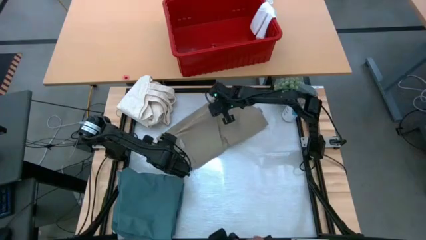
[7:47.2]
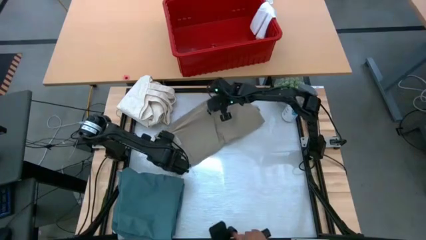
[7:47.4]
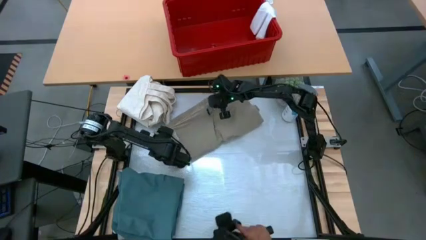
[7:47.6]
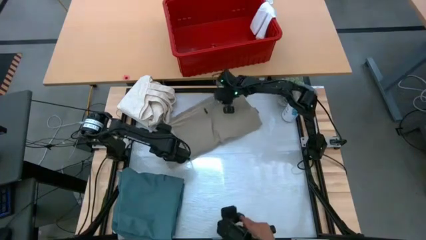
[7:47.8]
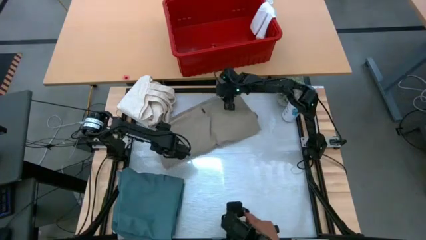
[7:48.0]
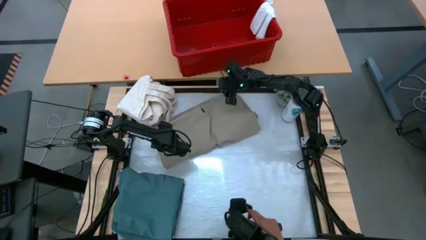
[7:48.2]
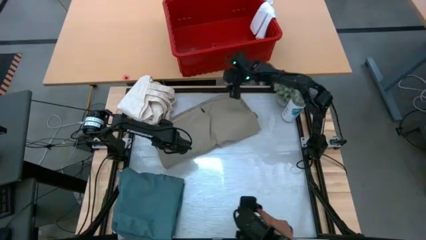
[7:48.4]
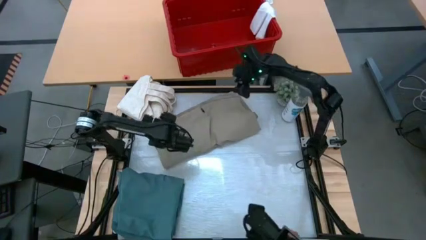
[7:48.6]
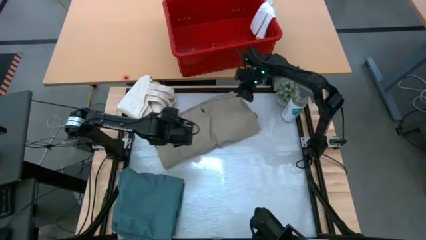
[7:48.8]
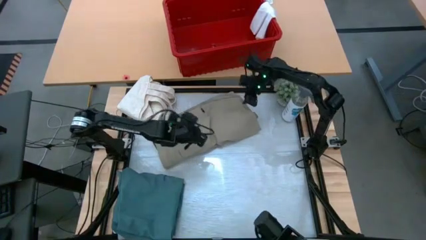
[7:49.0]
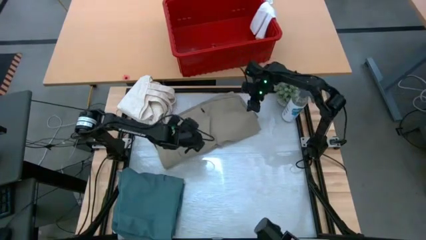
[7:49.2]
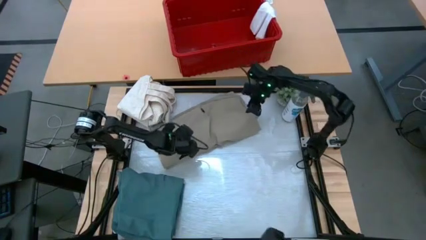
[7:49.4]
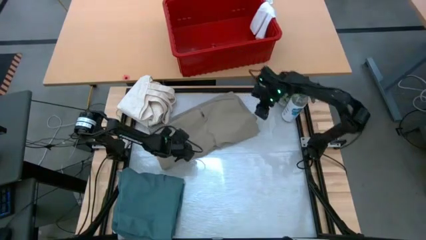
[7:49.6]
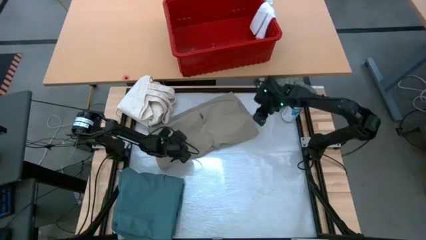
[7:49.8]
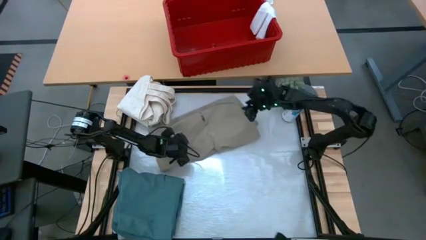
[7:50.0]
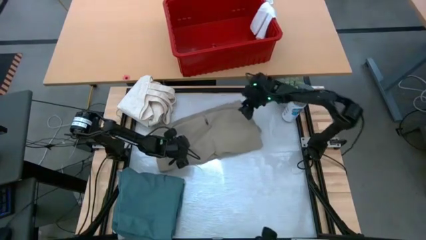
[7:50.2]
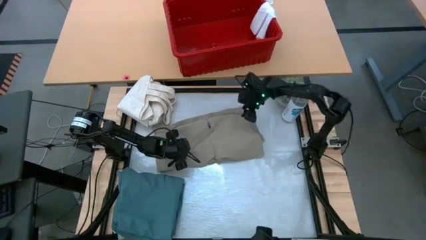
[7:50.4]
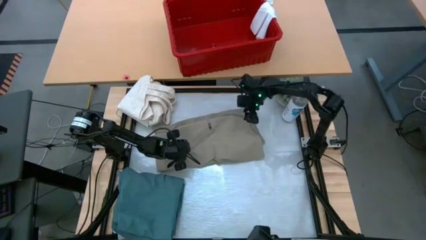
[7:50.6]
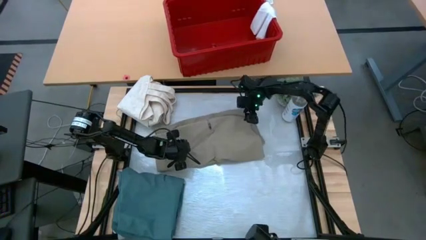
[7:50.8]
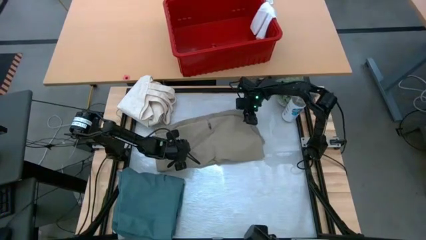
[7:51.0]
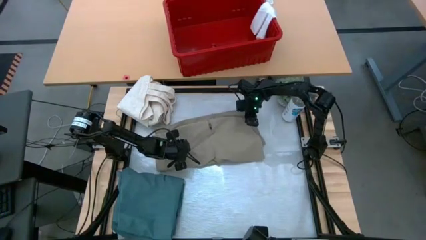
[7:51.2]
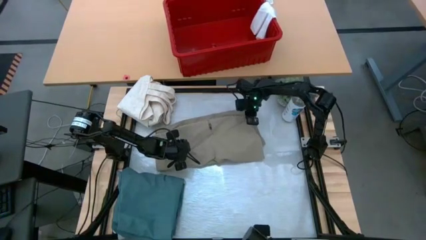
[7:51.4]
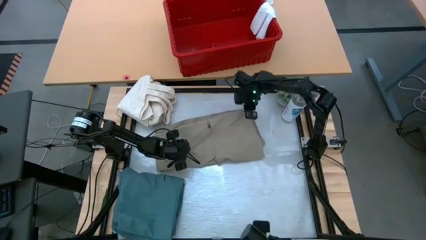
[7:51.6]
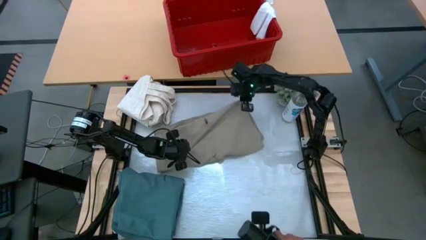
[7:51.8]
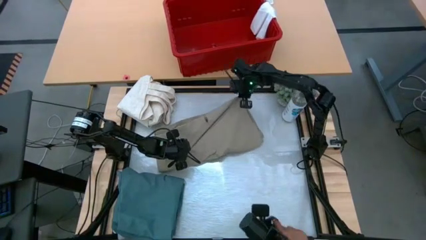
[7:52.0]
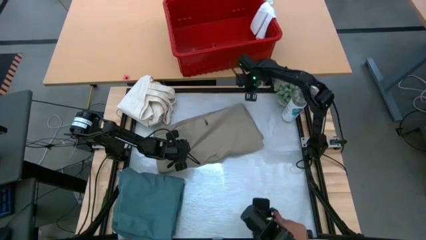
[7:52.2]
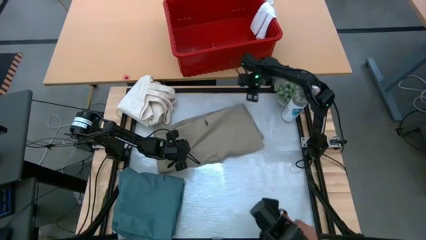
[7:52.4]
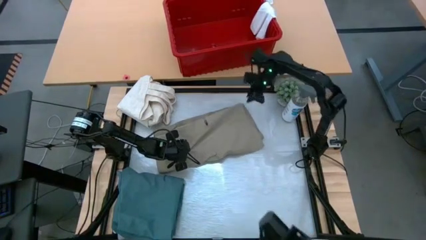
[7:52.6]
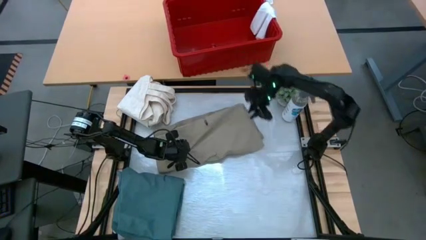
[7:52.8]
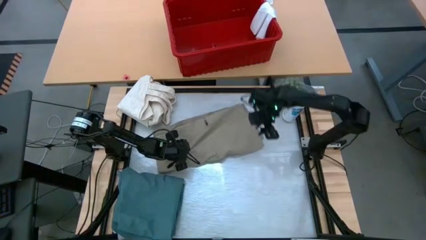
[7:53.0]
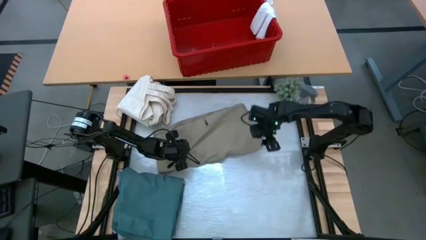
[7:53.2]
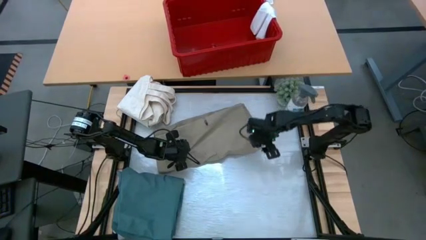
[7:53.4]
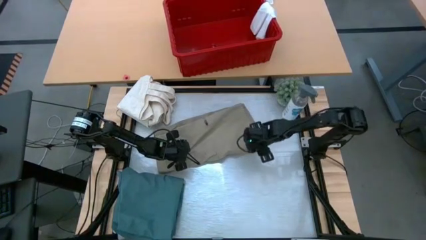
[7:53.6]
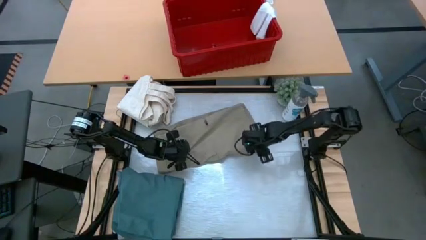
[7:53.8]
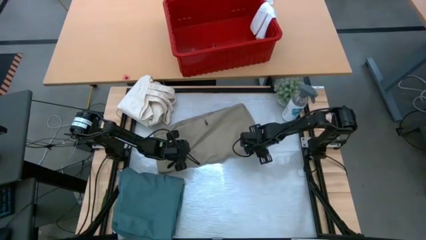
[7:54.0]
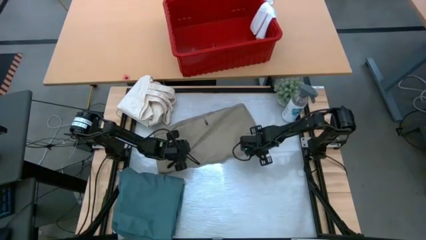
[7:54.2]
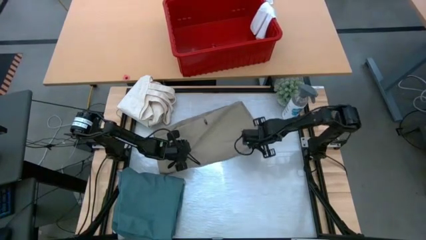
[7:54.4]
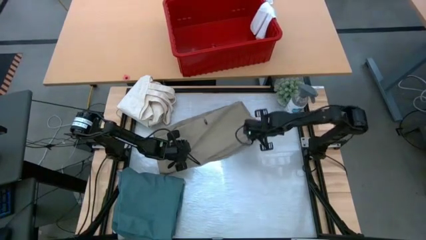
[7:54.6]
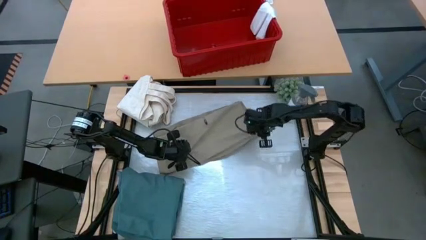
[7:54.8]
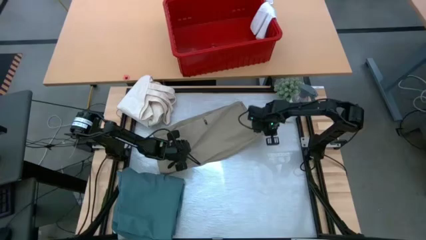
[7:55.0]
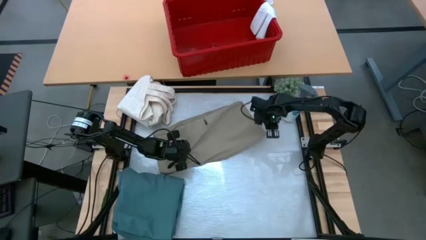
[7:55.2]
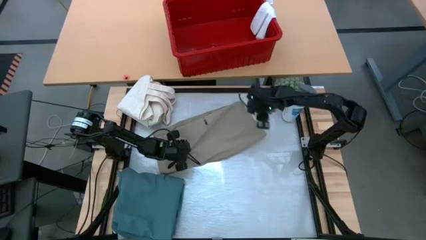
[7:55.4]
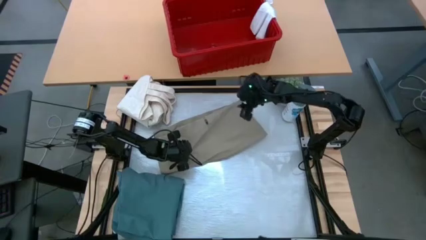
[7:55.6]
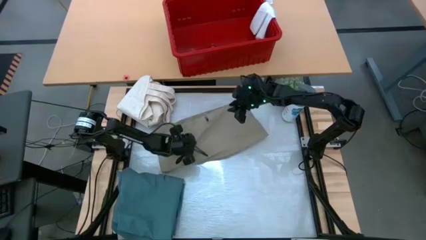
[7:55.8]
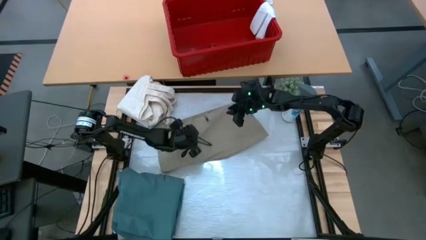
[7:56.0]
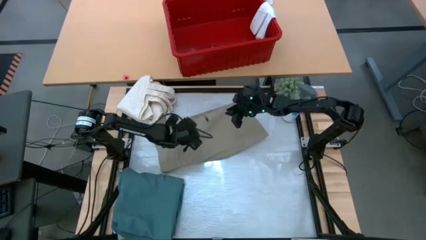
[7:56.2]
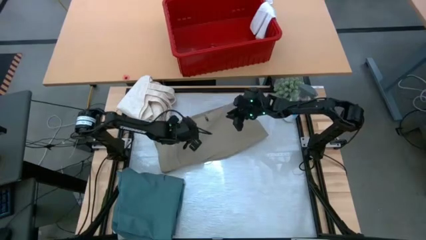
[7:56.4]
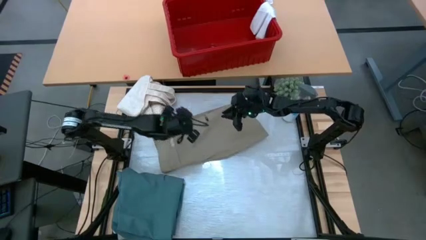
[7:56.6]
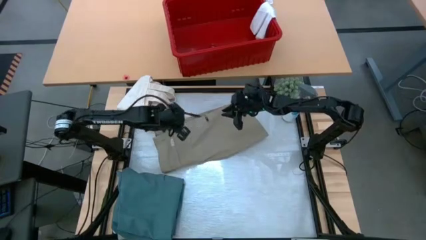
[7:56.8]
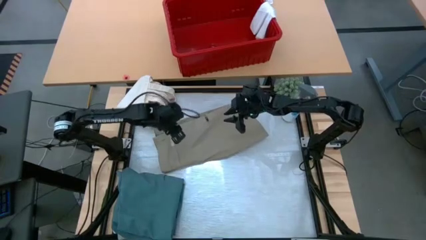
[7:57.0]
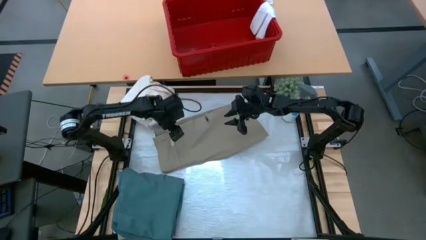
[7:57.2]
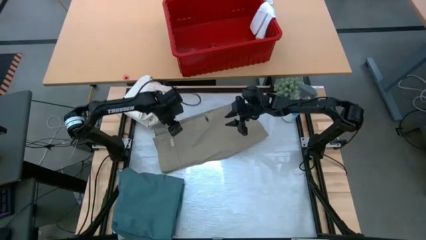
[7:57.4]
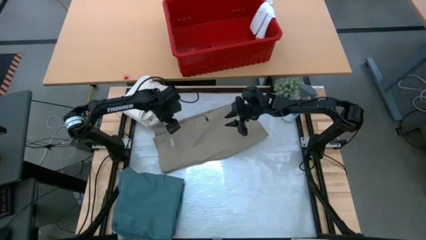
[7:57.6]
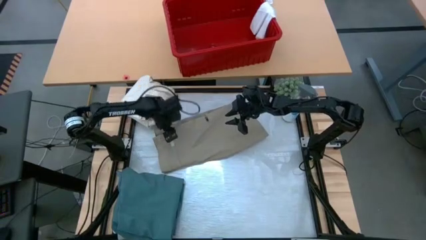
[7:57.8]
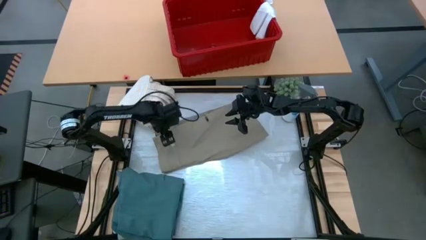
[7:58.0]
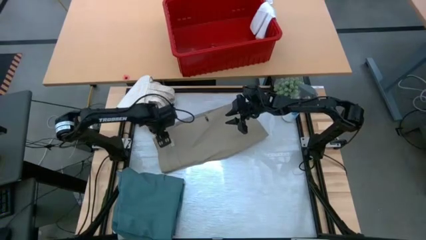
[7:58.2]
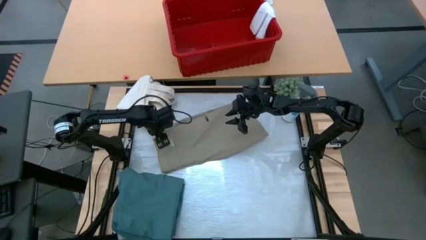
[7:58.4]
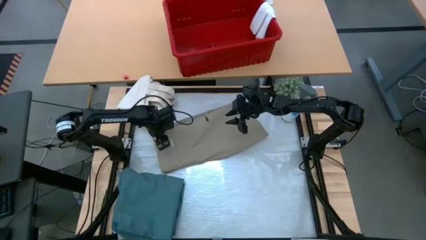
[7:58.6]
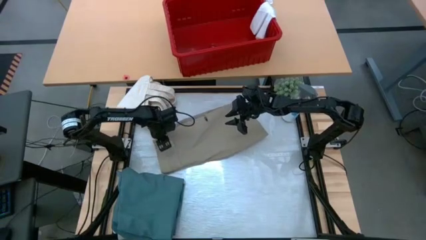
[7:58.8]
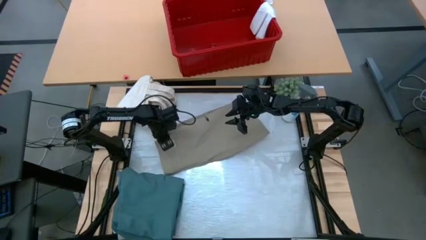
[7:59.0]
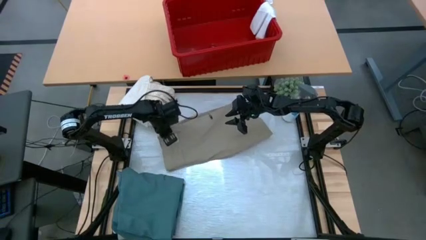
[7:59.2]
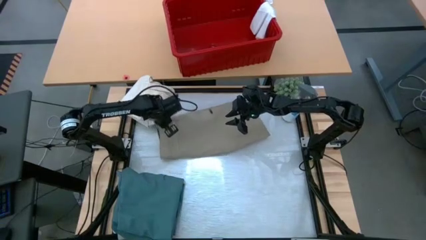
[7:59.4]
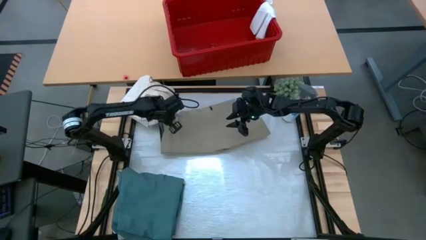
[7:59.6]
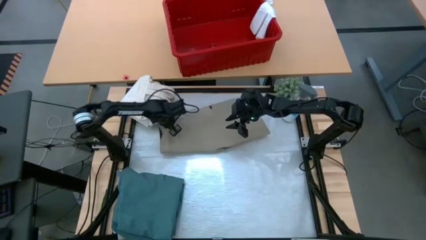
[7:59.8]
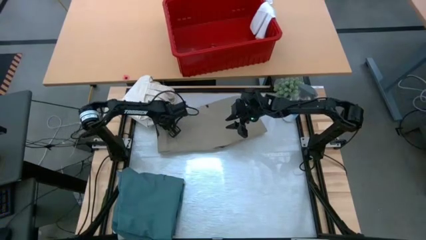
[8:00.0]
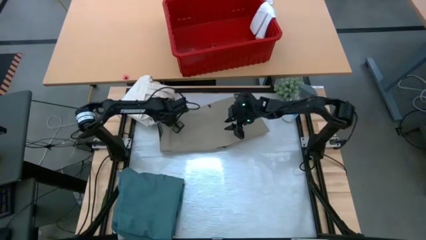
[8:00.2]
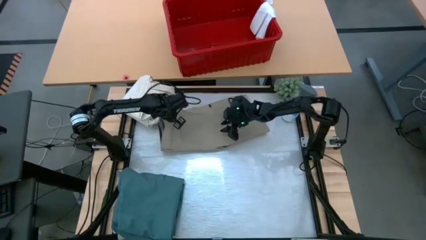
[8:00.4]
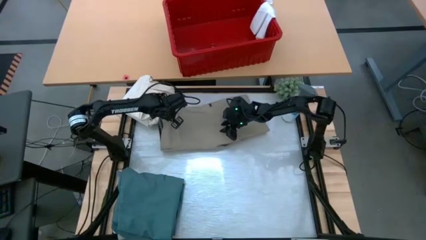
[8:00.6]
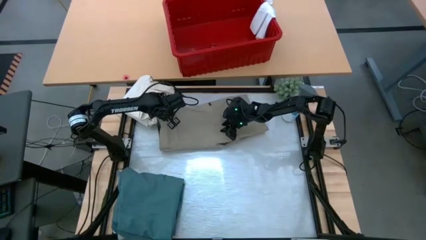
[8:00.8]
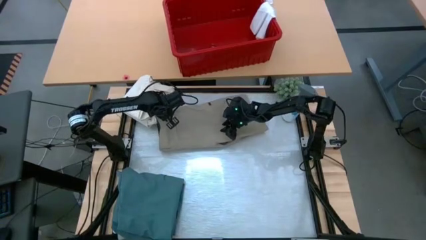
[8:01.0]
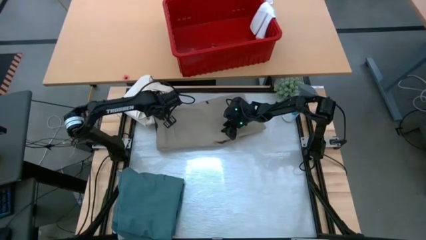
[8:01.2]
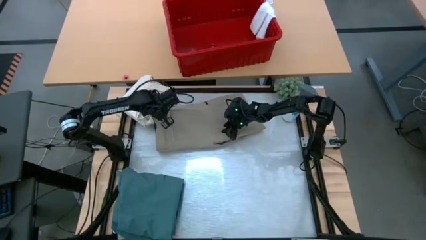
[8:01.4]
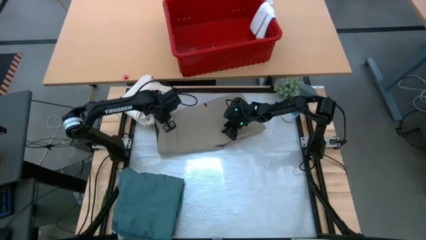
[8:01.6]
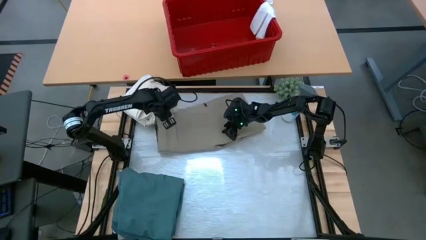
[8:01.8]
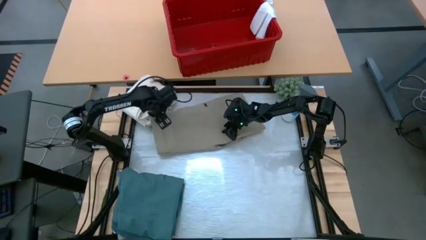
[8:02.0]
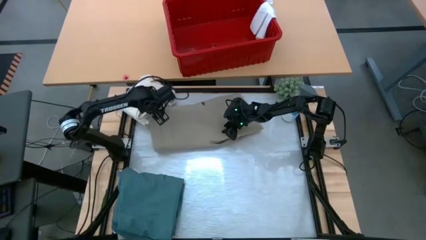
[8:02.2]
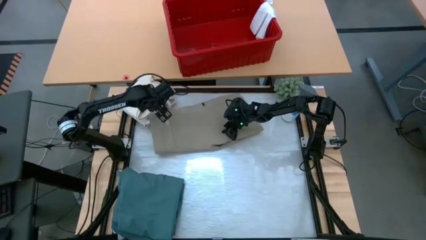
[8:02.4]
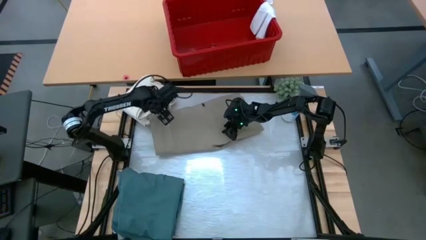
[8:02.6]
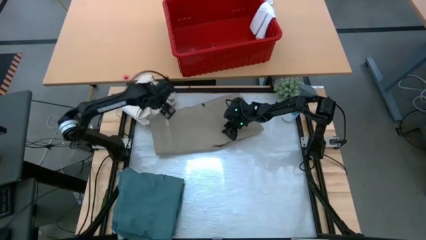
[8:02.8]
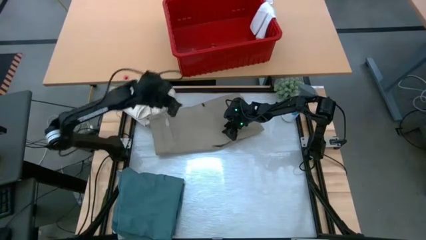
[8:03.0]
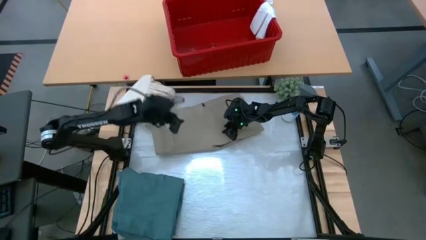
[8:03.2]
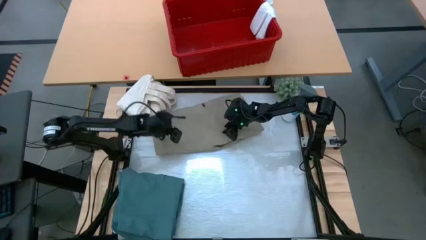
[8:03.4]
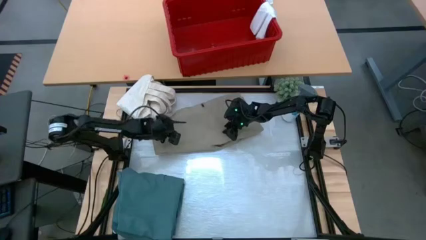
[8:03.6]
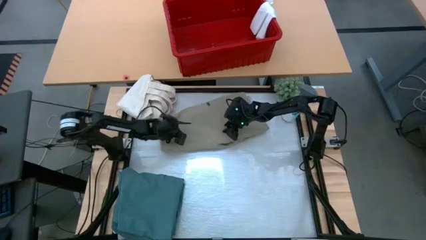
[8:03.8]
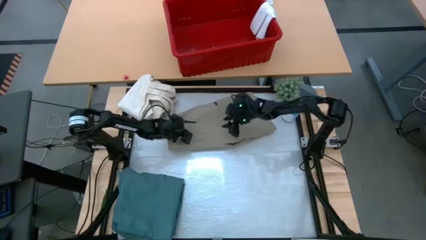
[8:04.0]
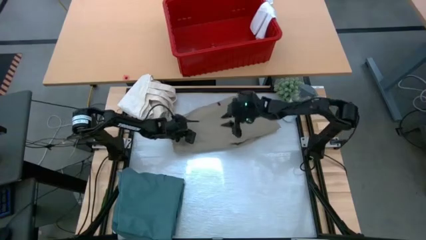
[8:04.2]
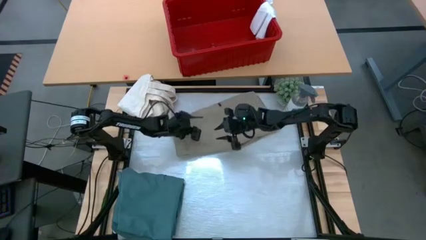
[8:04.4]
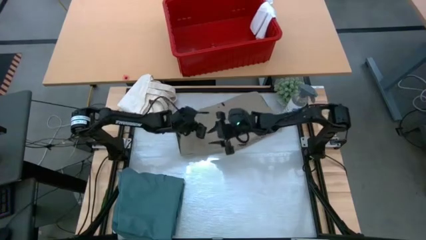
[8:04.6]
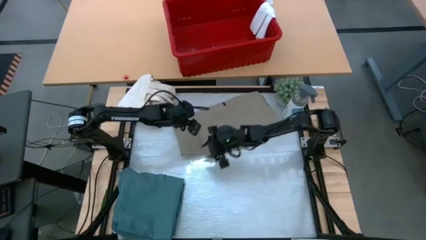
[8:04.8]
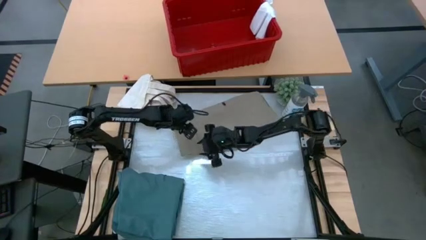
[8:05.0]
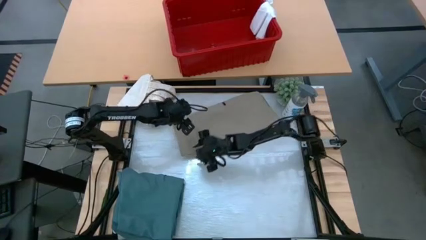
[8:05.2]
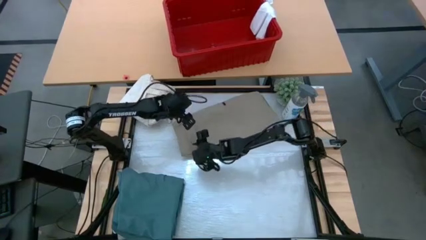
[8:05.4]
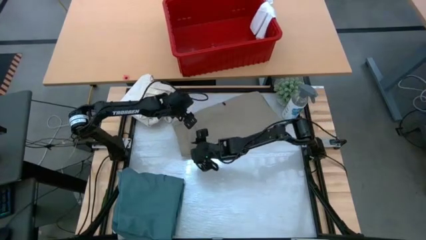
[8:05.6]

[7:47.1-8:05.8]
Task: Fold Laundry from Bin
Fold the brown shorts
